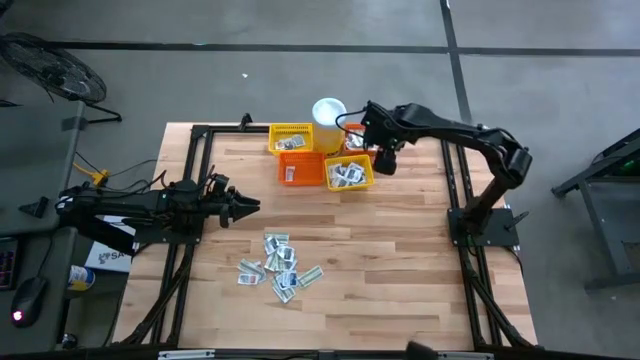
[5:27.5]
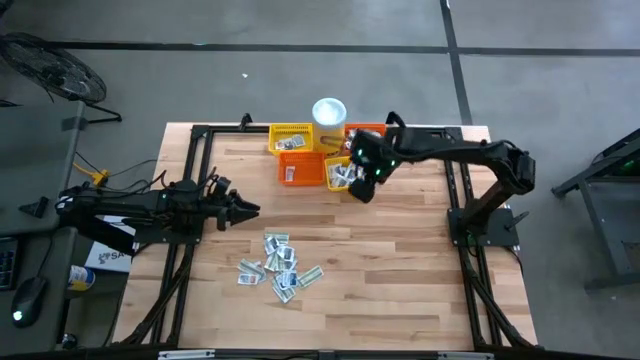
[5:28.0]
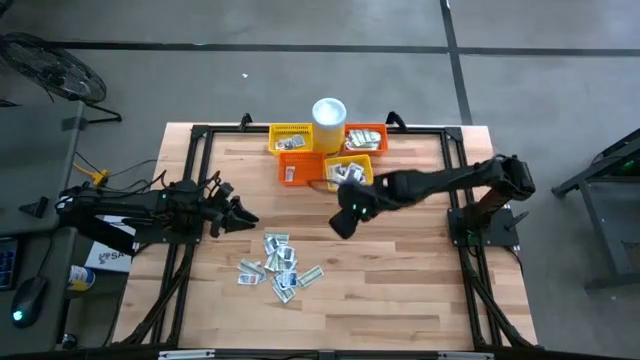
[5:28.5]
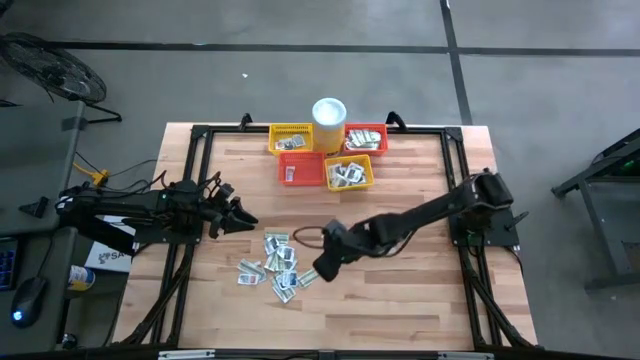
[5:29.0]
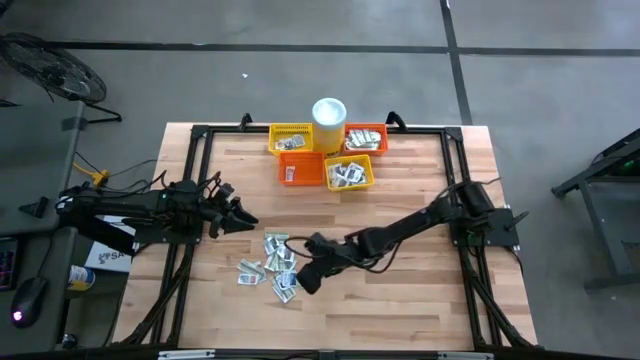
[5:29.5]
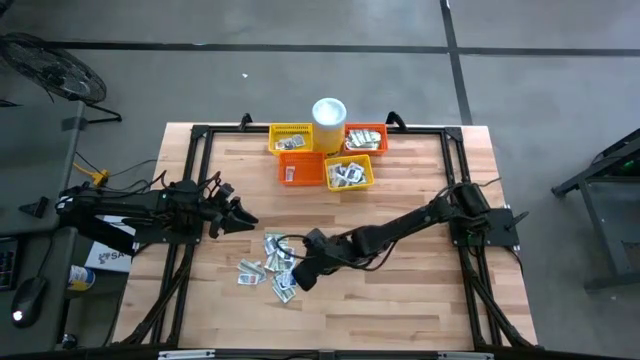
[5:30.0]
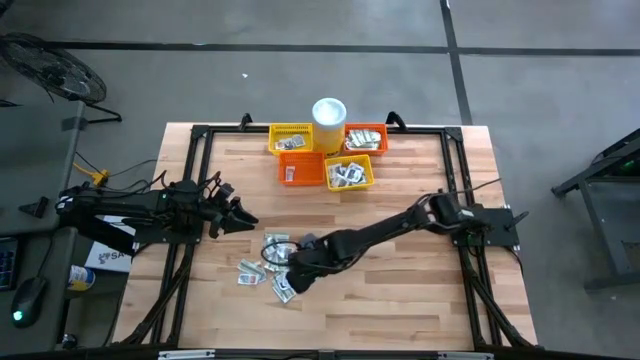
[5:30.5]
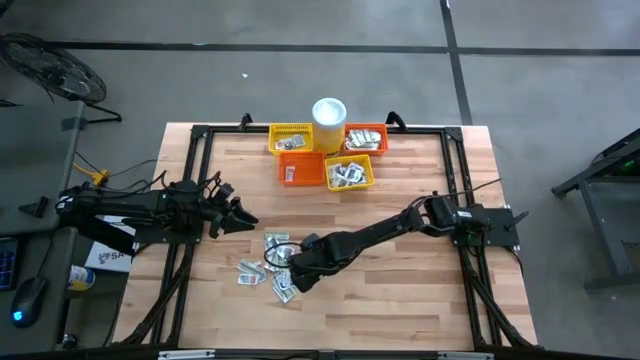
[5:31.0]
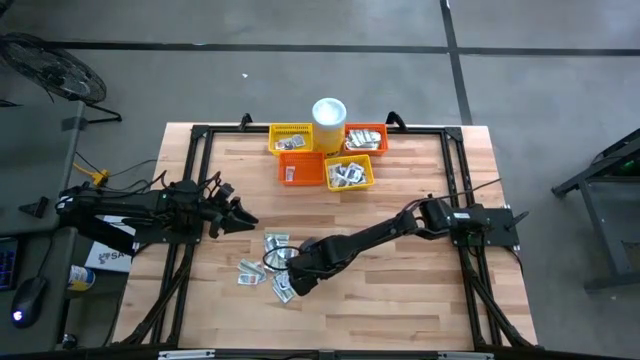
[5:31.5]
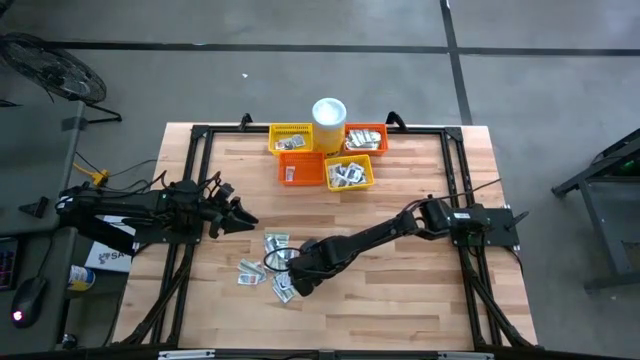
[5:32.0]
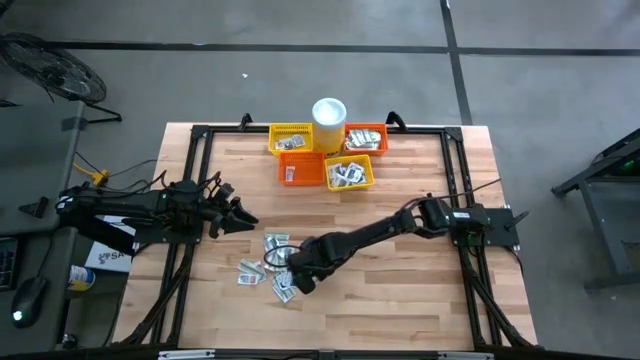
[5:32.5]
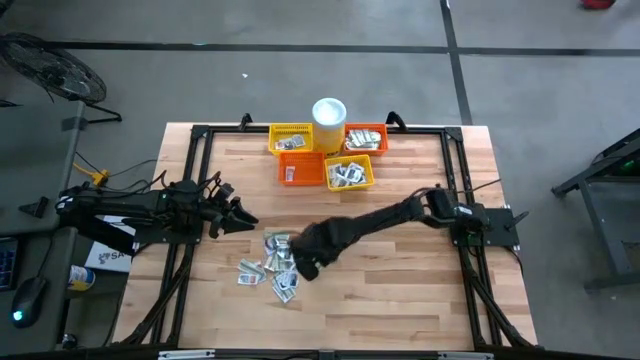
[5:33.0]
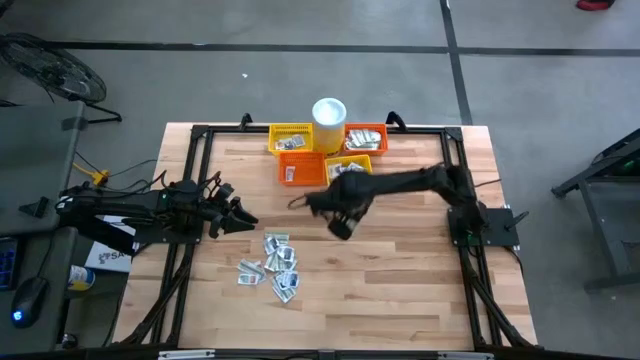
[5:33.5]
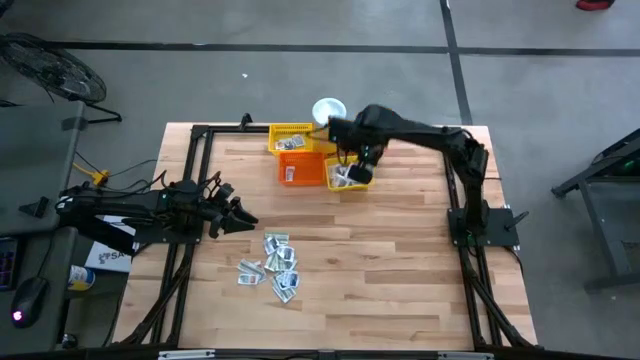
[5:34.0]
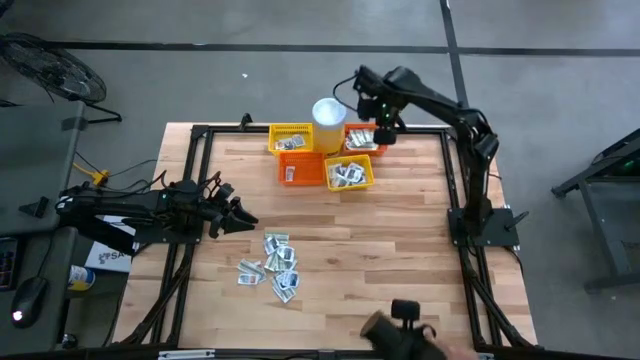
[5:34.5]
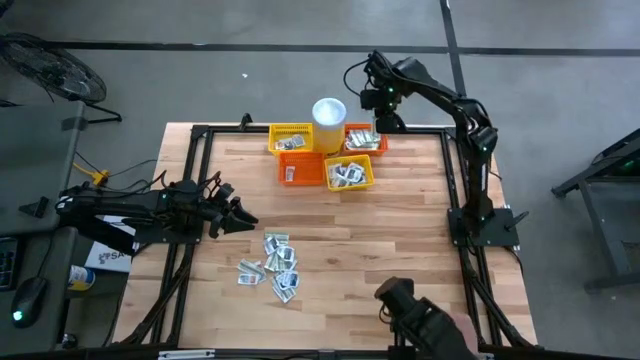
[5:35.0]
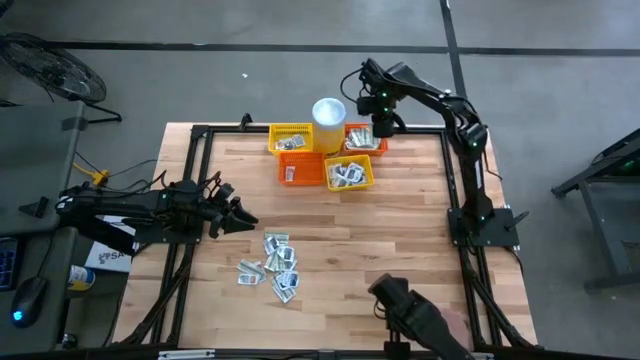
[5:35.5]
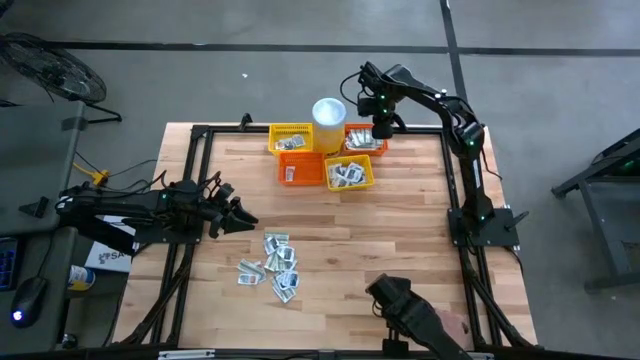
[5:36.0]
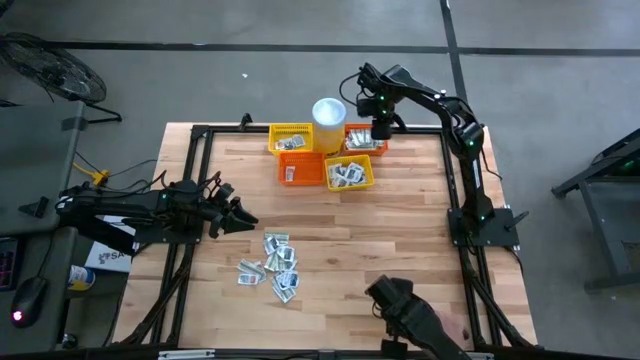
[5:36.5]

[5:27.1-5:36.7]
Task: Pick & Place First Aid Supplies
Put the green bandage pack into the top orange basket

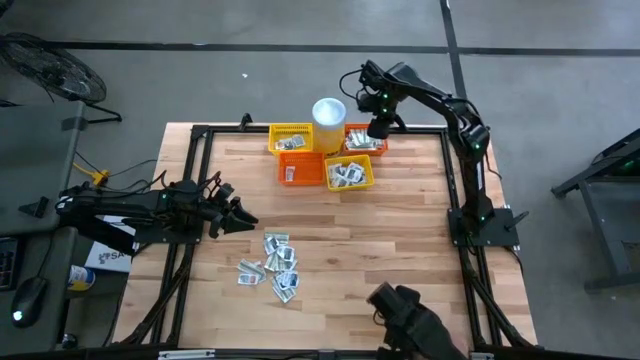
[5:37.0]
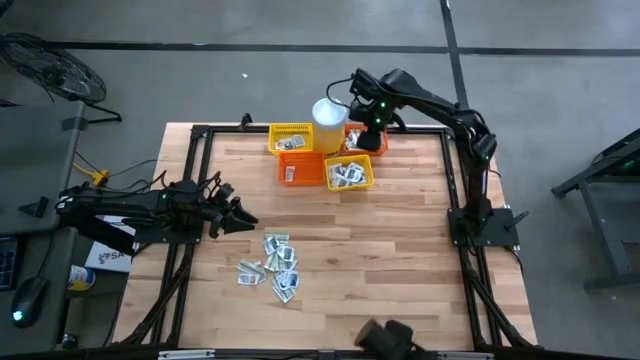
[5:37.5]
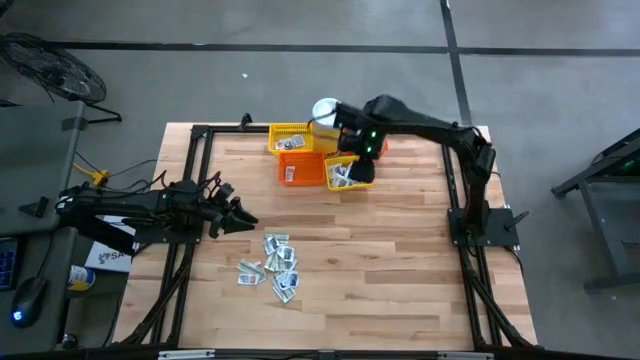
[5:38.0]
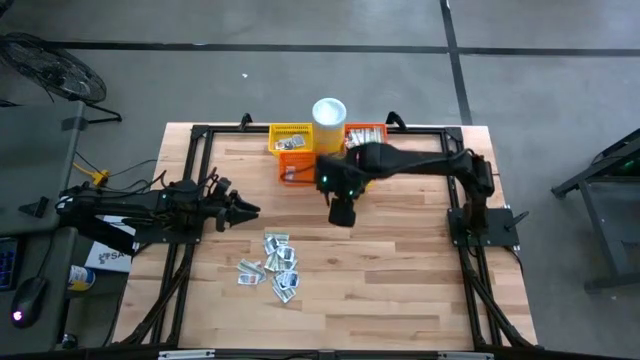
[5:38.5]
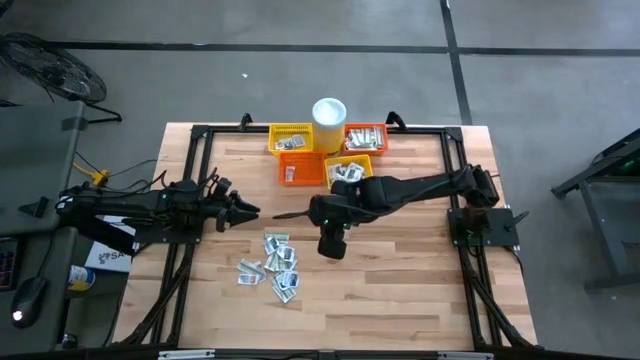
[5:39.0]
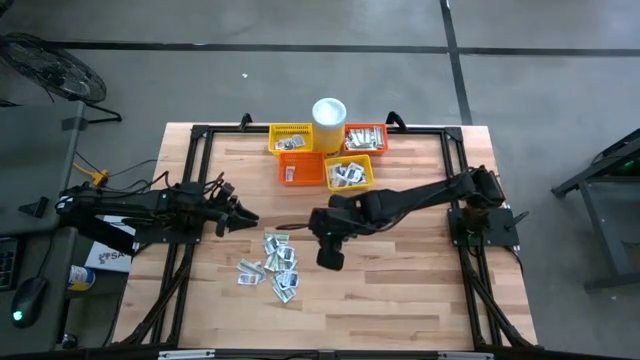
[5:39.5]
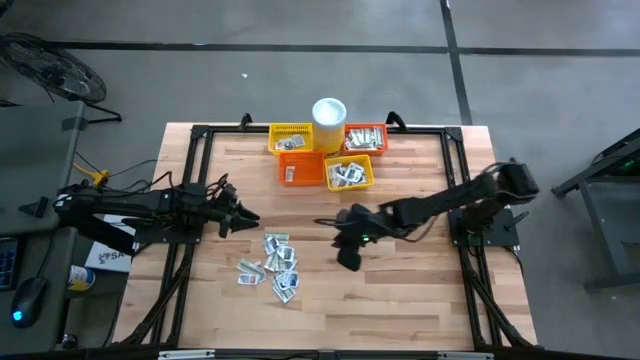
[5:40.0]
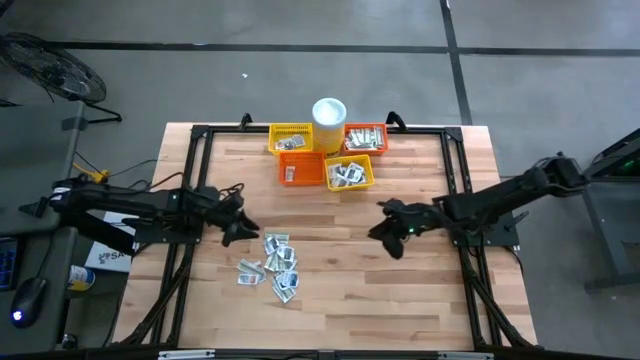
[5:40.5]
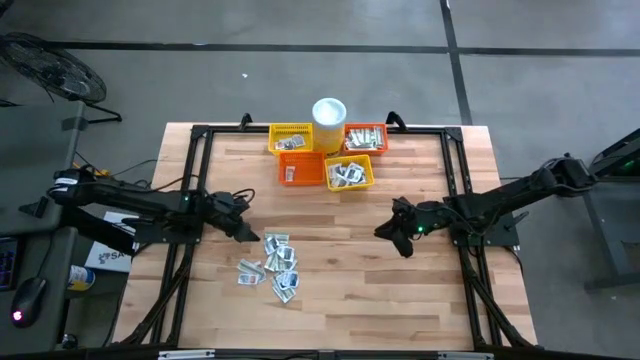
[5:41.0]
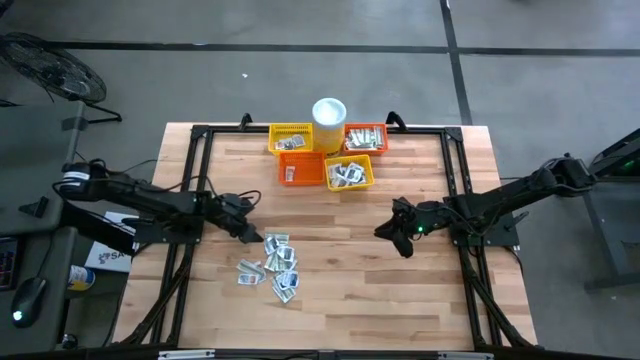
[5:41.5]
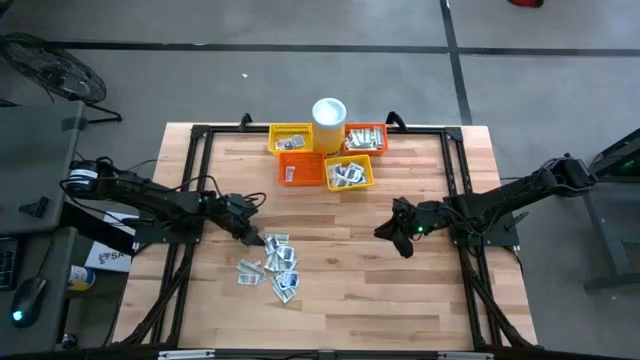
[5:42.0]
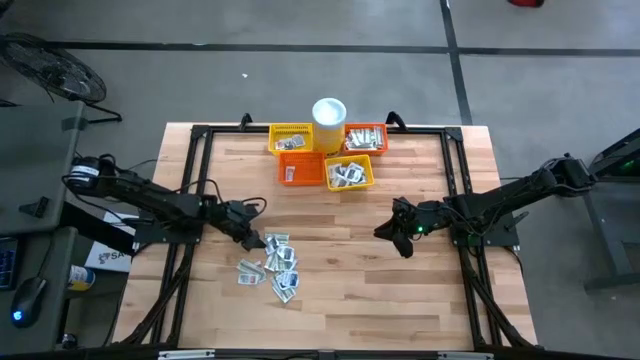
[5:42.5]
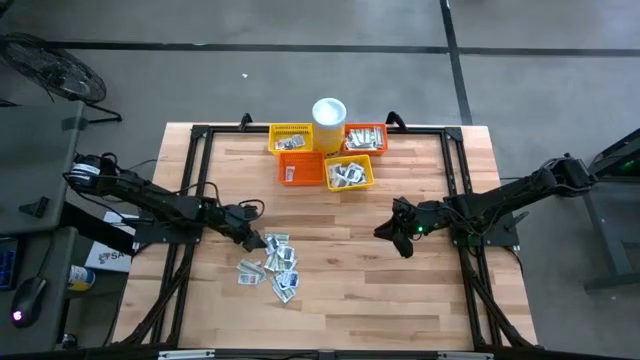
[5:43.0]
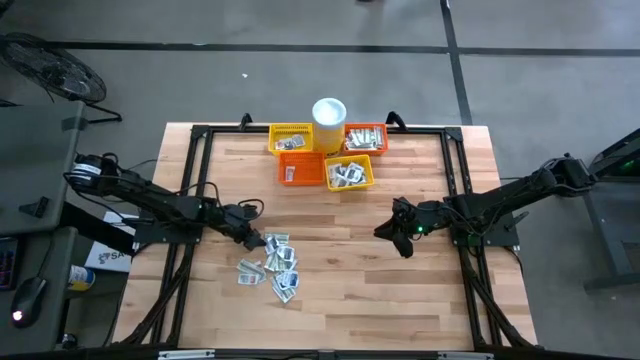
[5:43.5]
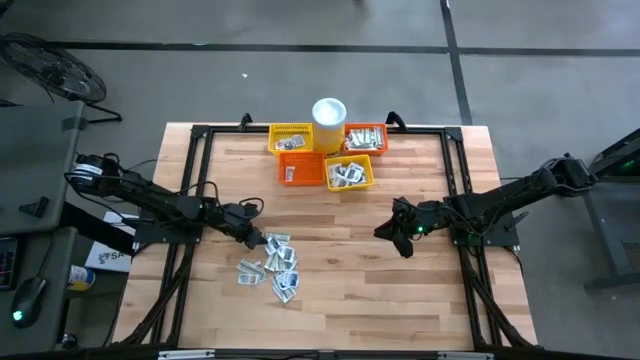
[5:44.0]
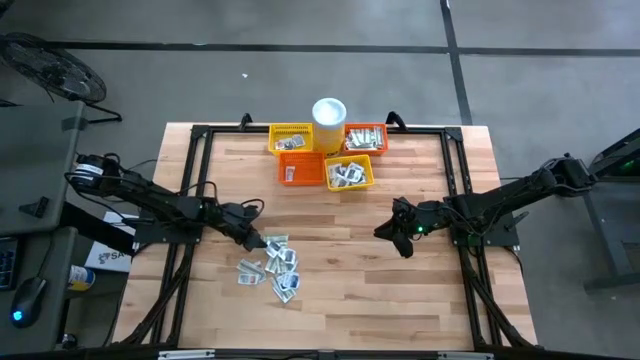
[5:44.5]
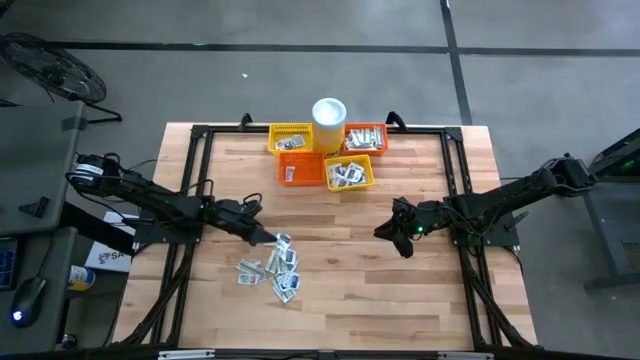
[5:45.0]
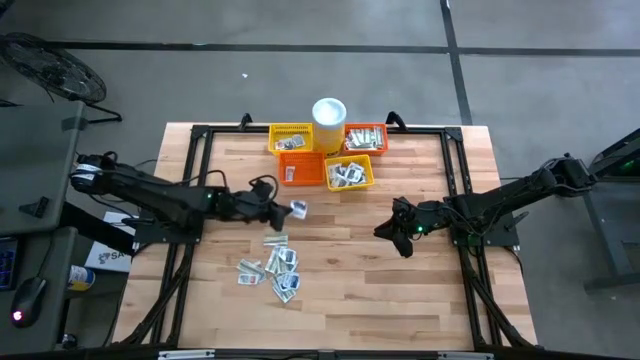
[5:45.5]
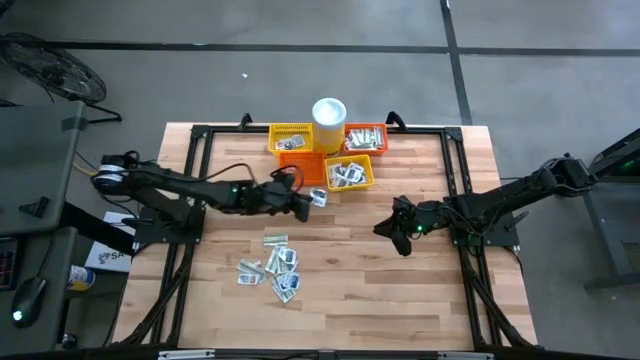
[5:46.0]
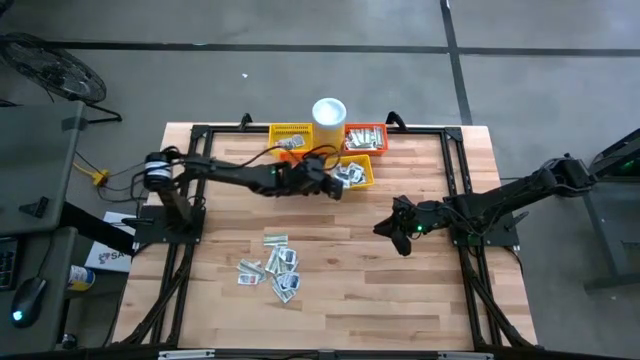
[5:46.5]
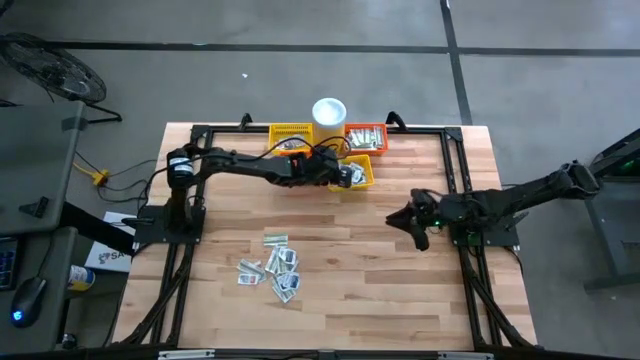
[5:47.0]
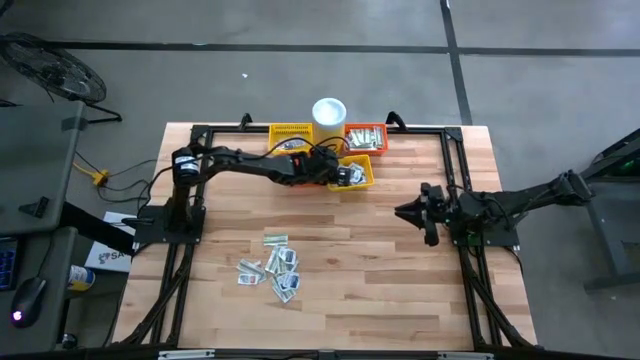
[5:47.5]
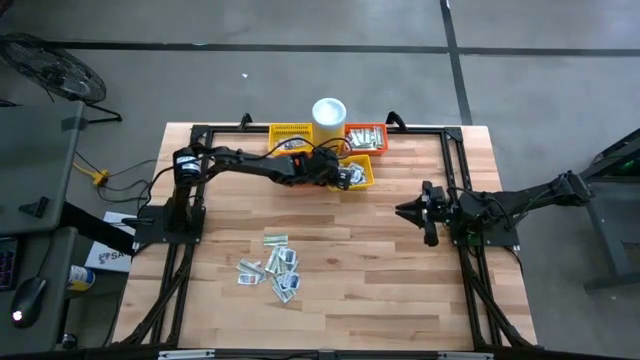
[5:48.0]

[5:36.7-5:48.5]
Put the black towelette pack into the bottom yellow basket
